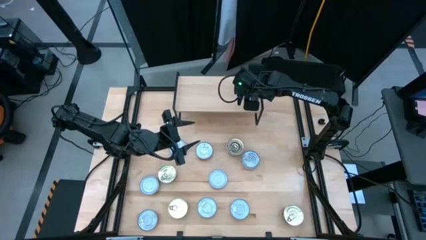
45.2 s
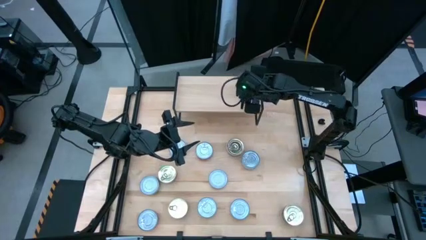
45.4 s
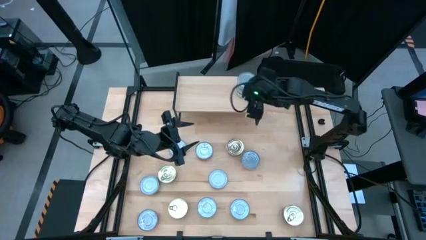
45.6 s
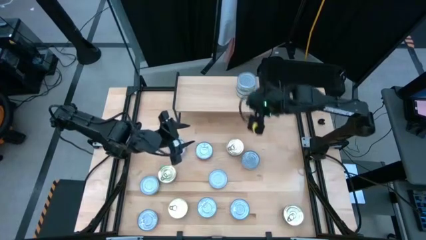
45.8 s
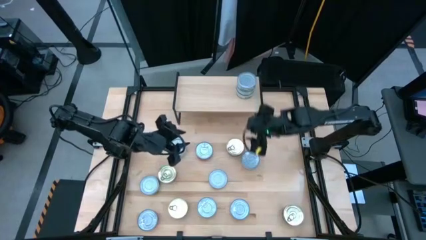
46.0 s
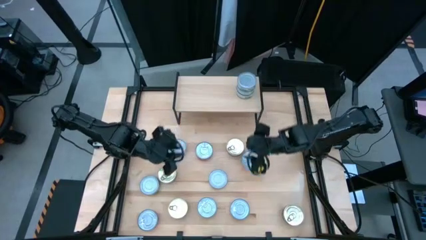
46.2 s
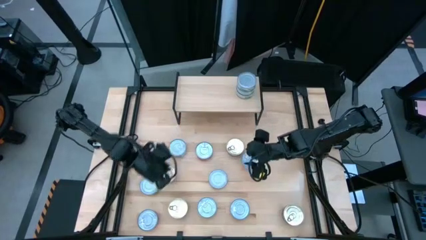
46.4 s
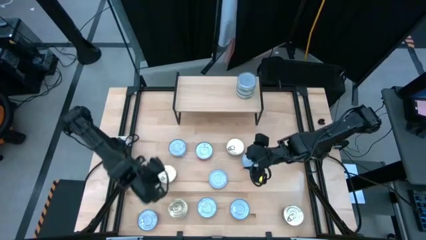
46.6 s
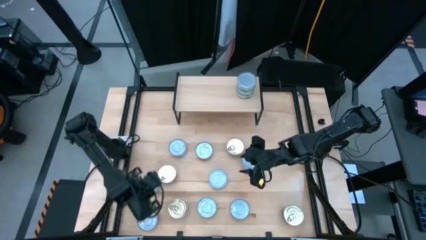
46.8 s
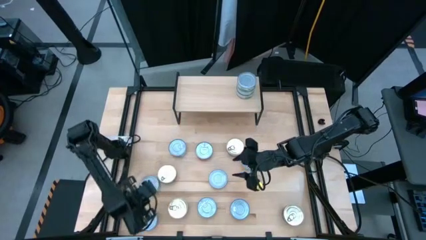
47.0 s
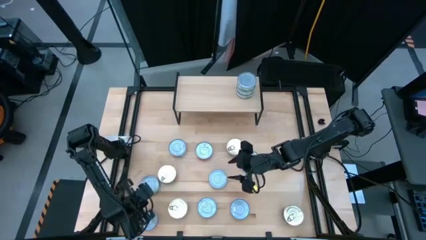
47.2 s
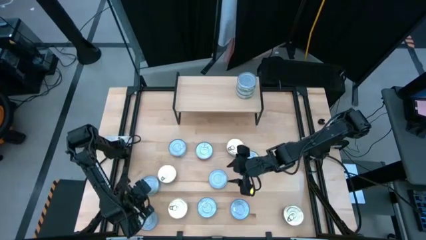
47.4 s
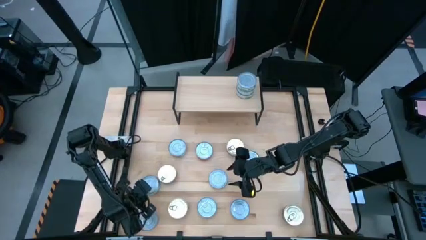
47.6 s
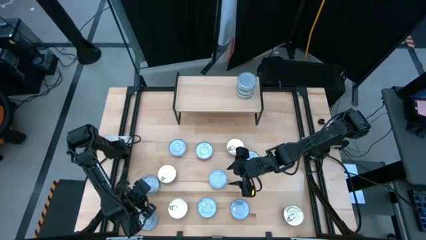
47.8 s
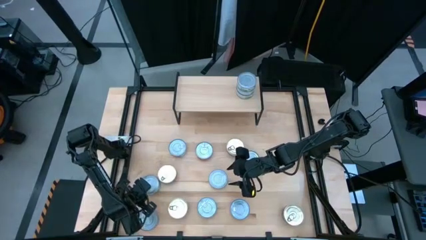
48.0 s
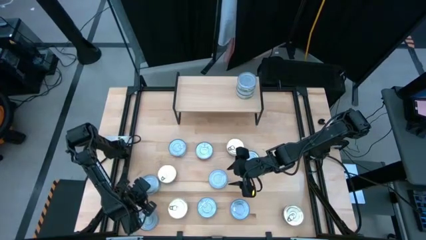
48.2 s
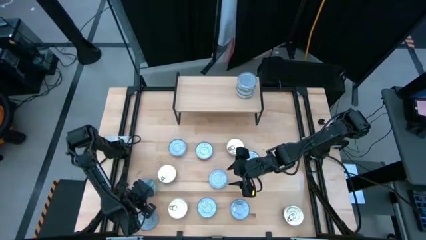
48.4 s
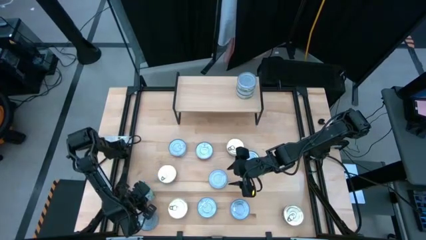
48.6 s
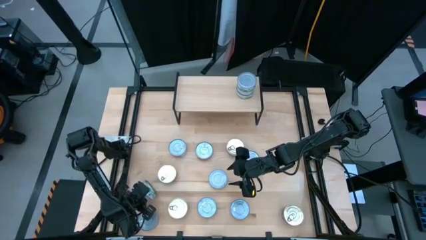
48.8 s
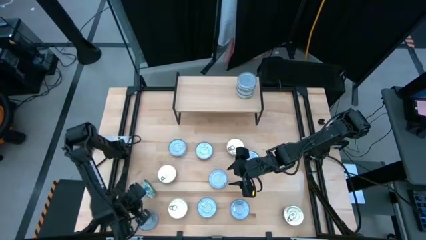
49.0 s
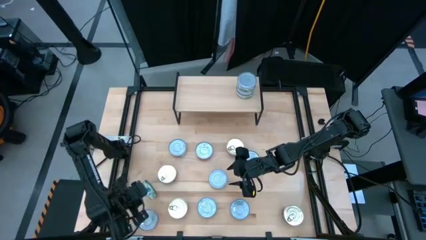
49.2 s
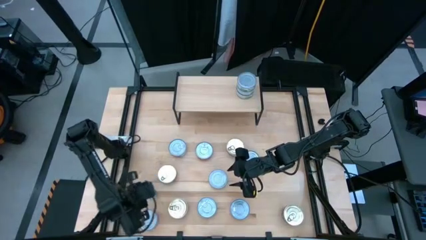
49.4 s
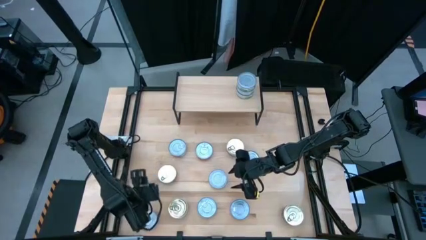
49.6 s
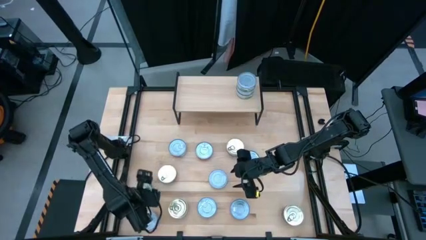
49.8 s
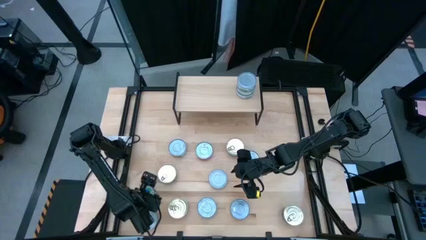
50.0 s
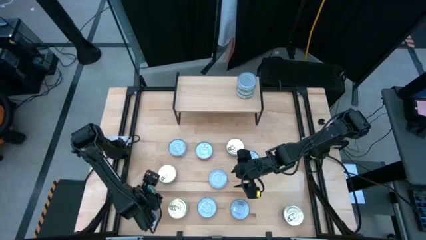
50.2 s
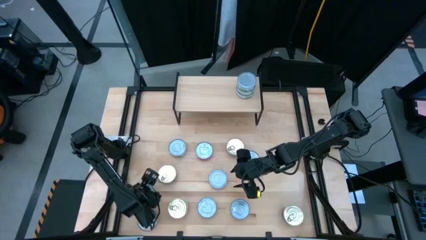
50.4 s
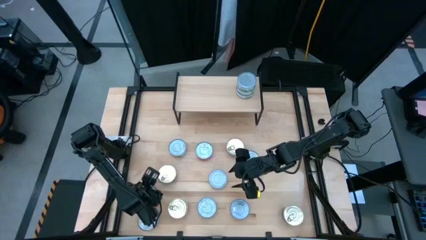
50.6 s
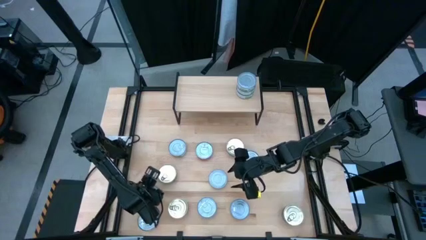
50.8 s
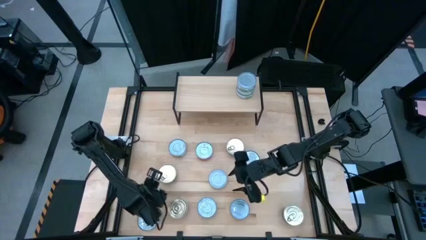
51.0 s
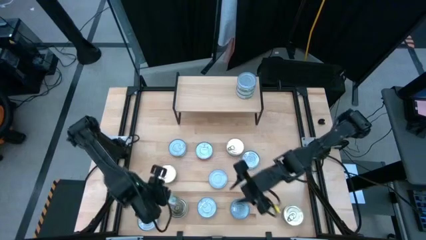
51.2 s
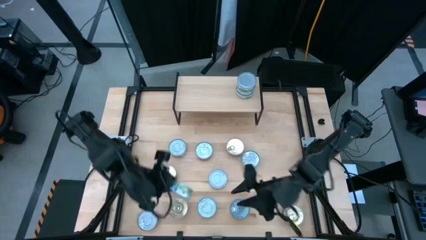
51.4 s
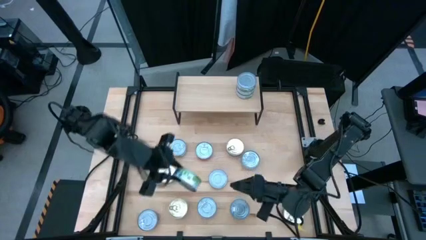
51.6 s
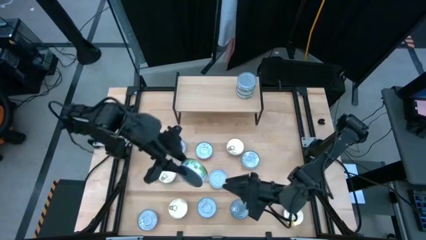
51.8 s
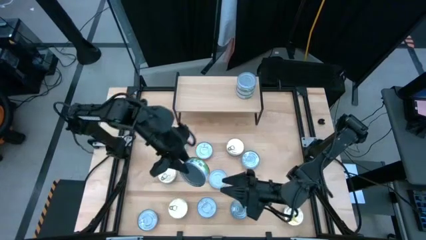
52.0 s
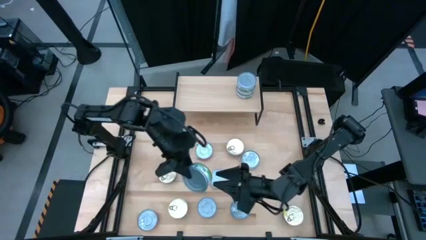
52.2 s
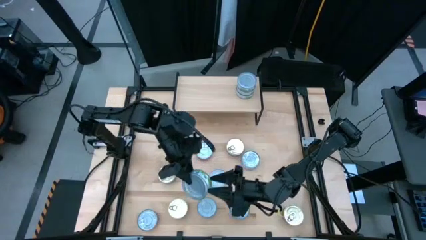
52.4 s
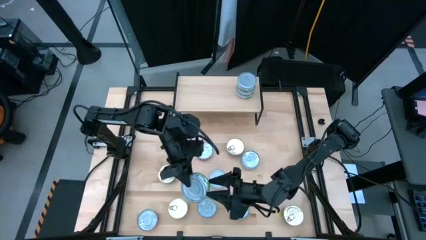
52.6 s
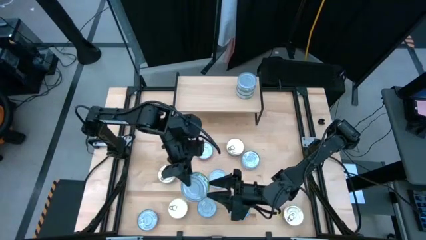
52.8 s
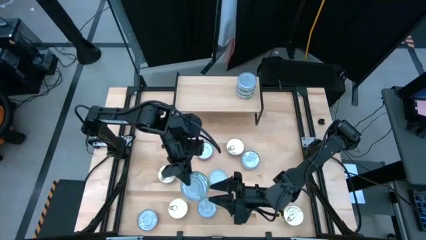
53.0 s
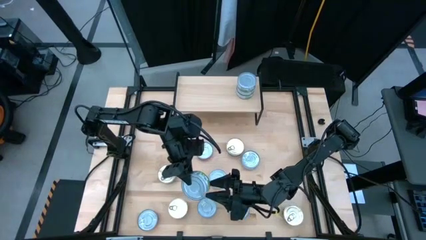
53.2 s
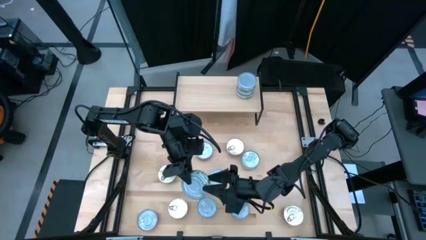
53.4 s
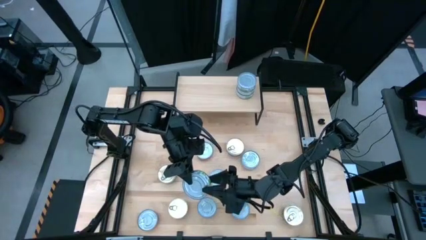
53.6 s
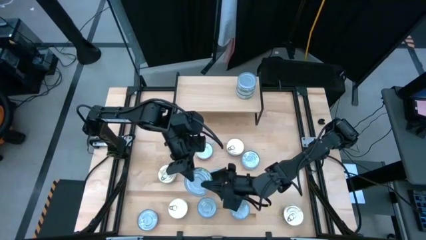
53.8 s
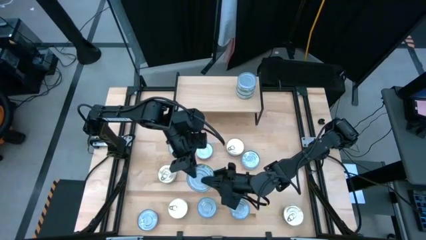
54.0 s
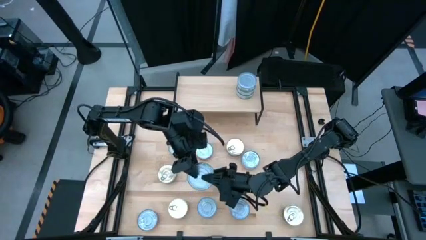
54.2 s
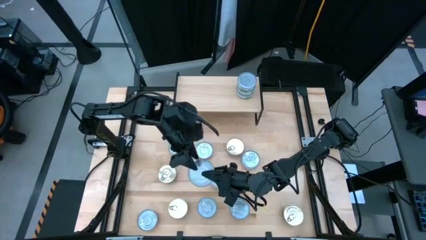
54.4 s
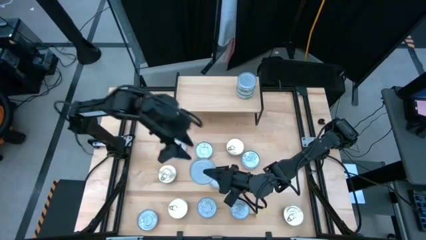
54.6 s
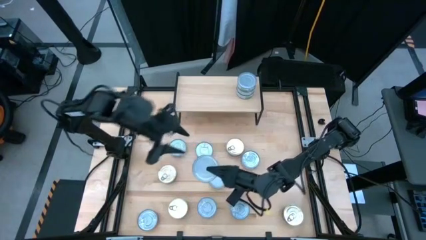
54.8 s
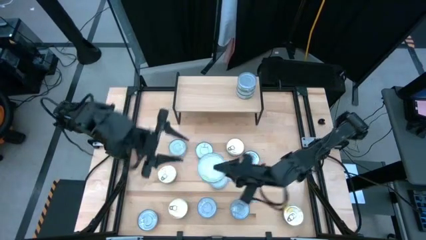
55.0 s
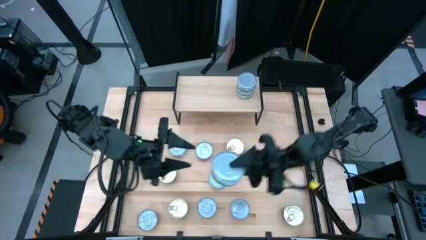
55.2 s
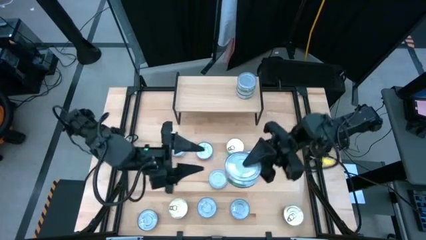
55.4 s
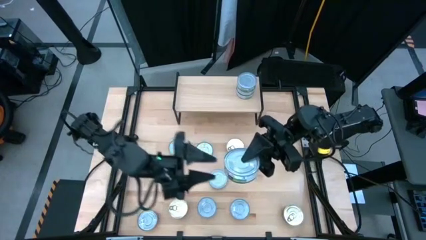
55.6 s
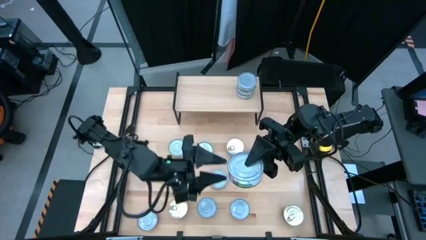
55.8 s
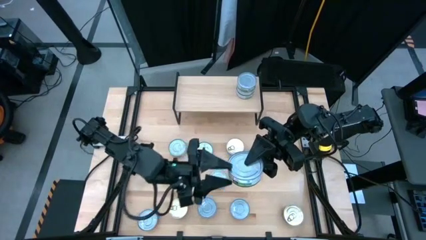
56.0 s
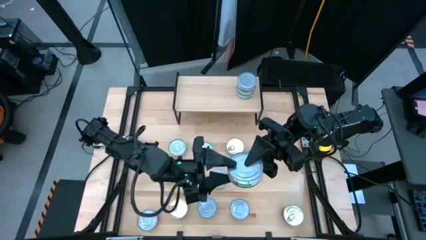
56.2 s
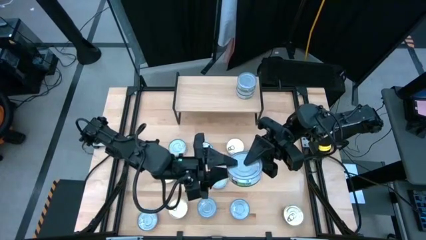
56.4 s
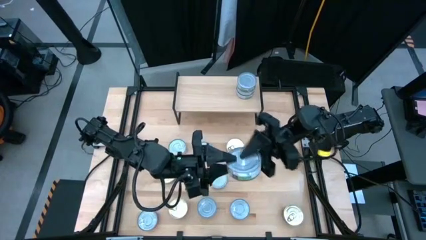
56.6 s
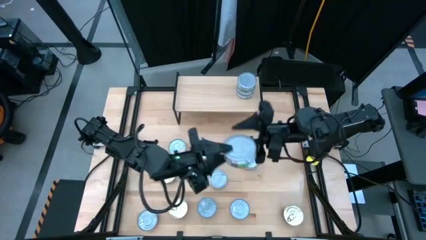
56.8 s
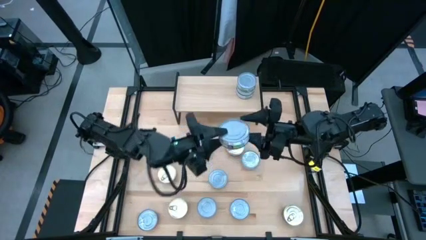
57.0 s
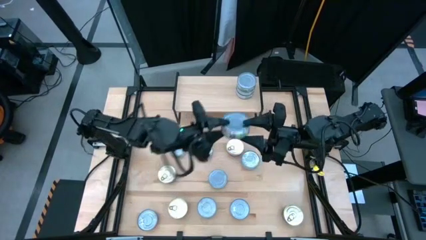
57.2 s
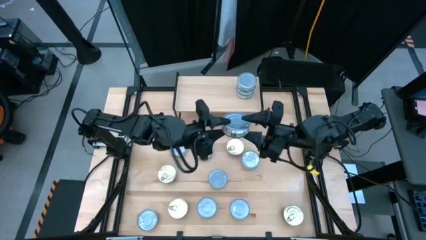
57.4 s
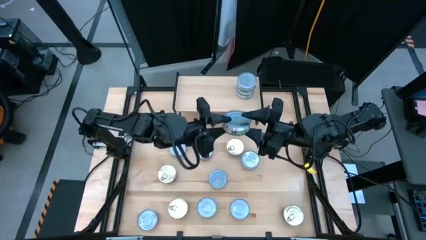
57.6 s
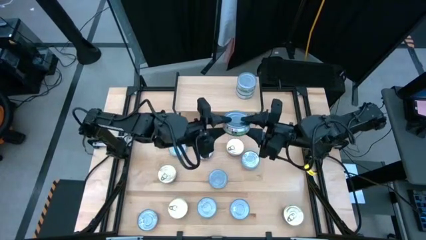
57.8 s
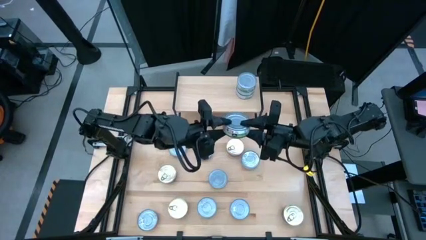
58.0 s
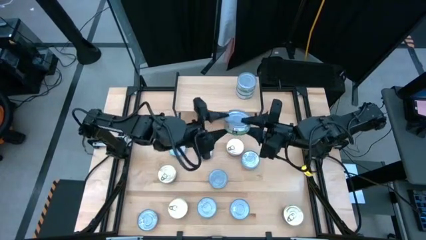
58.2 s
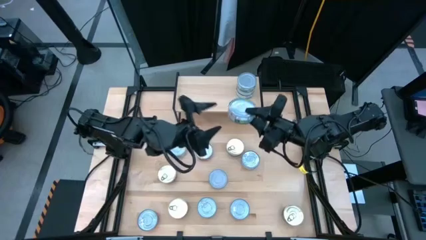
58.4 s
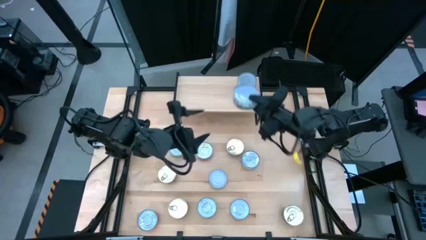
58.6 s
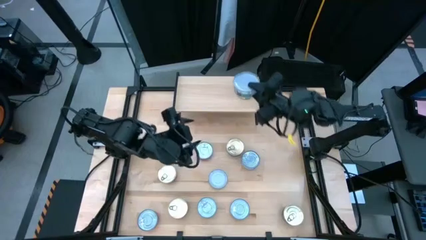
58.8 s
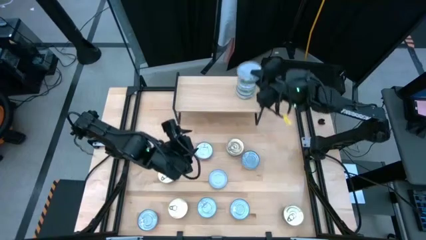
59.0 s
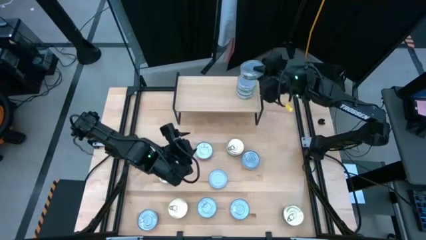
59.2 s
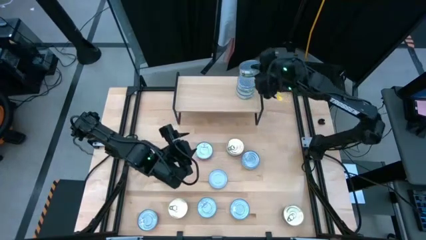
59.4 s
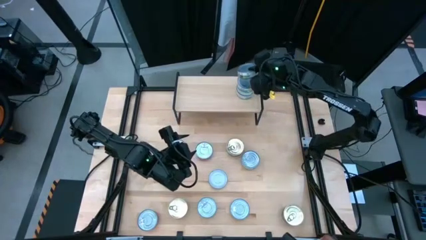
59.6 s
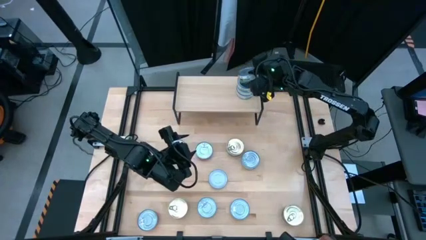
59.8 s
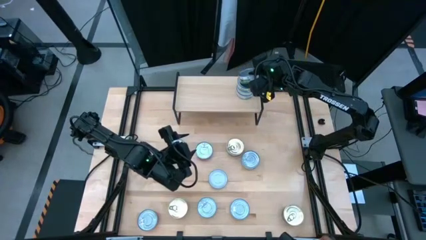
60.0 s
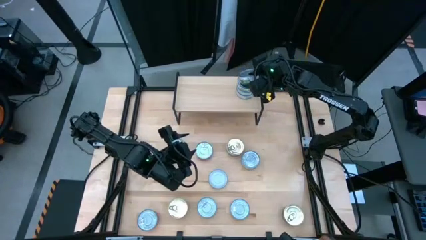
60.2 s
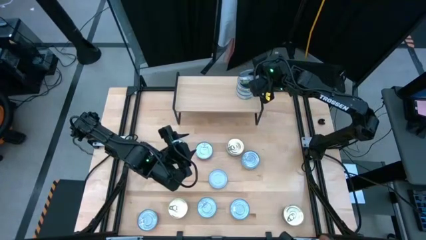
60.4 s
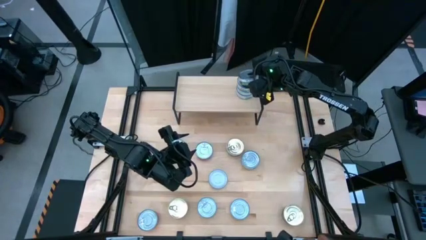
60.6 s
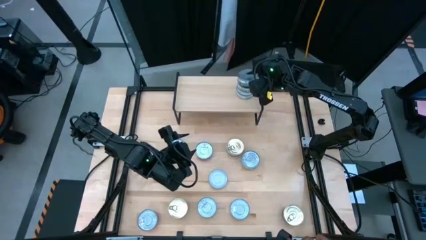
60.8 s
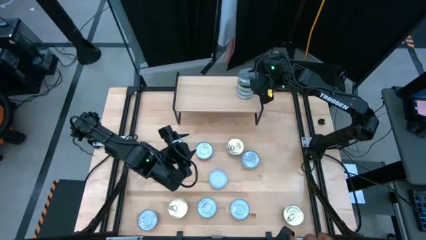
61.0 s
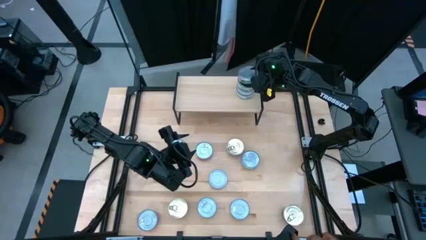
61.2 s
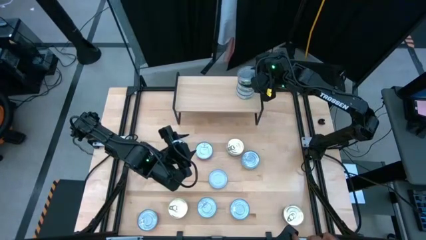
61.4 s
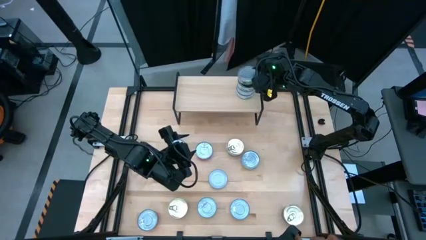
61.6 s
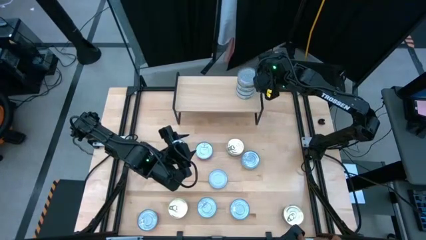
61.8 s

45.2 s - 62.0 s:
Task: Stack canned seafood by type on shelf
Stack the green tuna can on top of the other green tuna cans on the shelf
